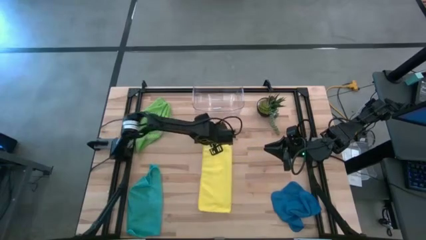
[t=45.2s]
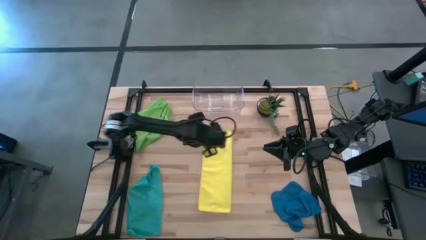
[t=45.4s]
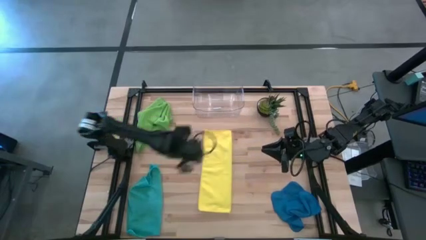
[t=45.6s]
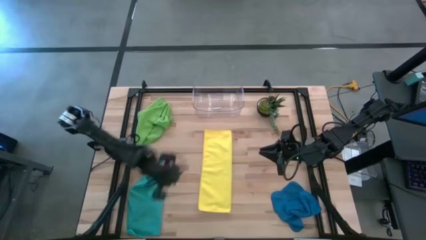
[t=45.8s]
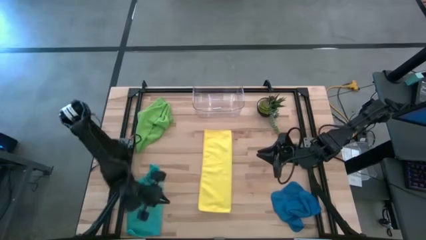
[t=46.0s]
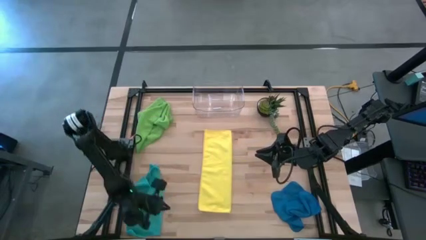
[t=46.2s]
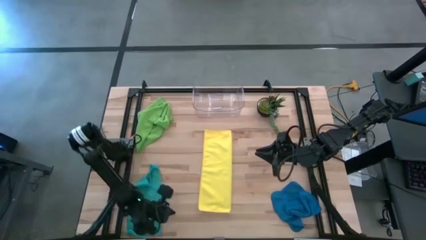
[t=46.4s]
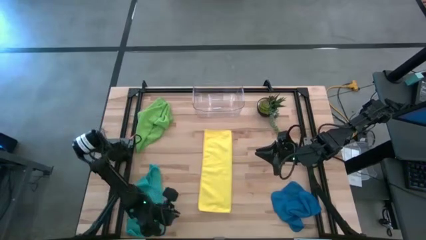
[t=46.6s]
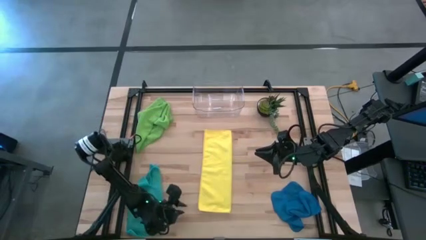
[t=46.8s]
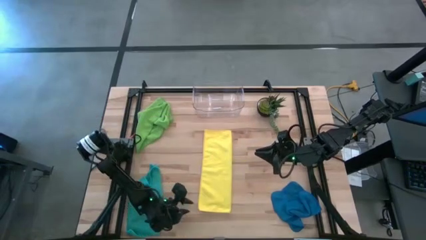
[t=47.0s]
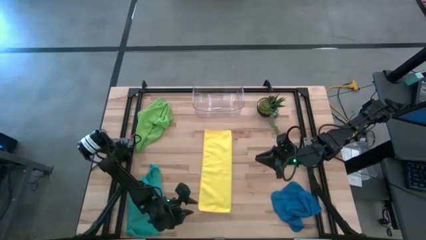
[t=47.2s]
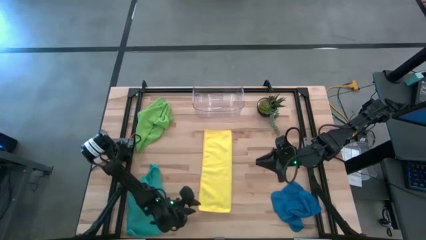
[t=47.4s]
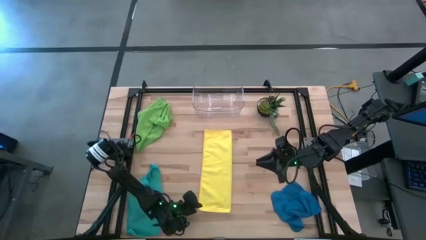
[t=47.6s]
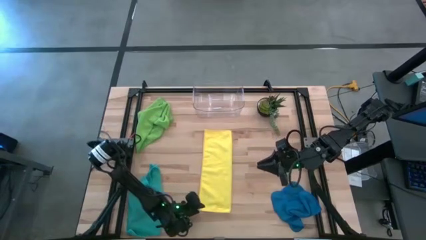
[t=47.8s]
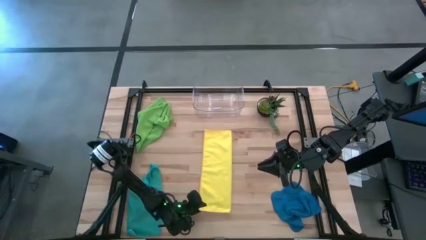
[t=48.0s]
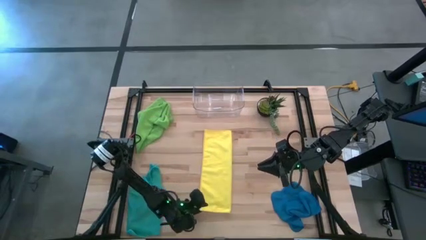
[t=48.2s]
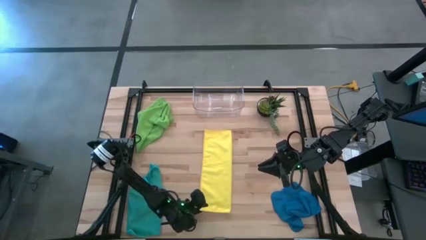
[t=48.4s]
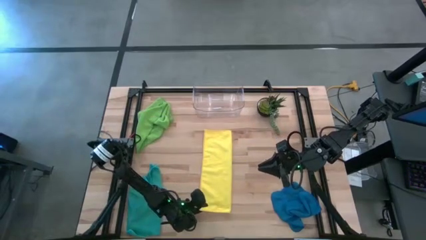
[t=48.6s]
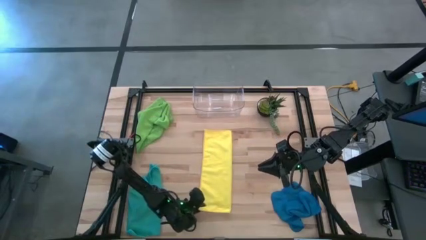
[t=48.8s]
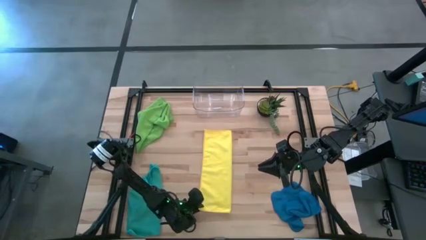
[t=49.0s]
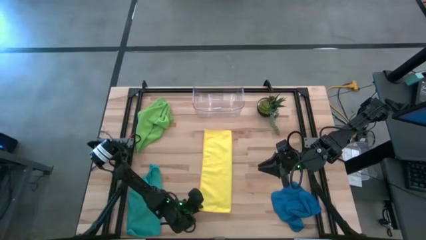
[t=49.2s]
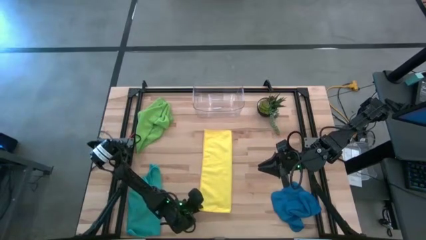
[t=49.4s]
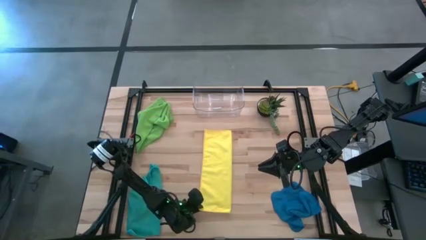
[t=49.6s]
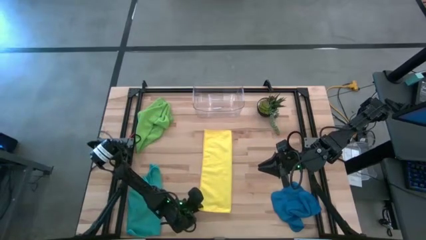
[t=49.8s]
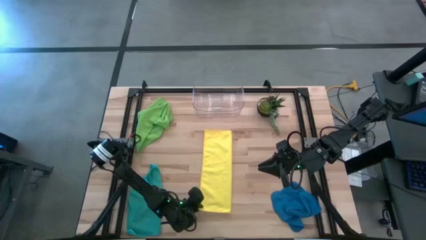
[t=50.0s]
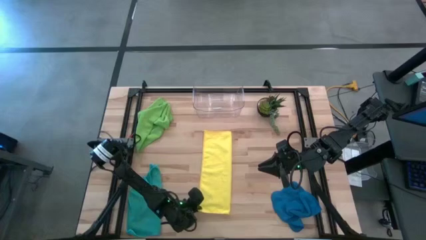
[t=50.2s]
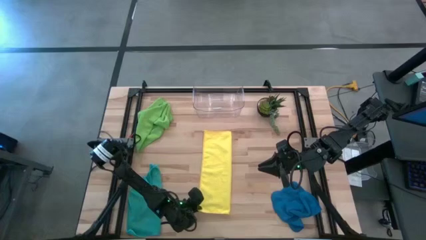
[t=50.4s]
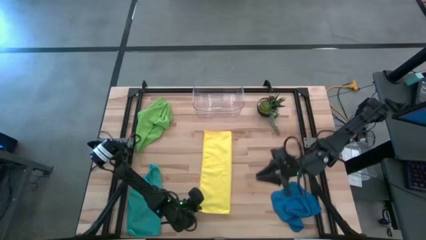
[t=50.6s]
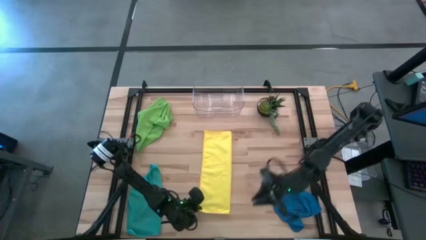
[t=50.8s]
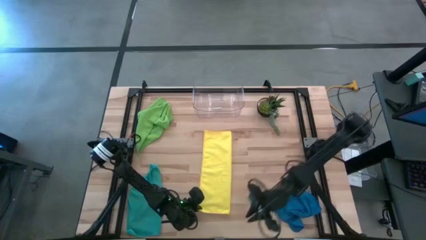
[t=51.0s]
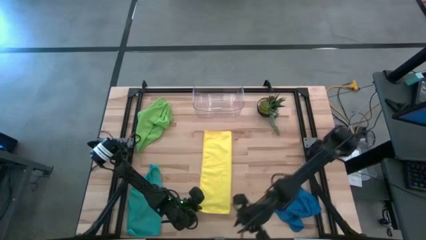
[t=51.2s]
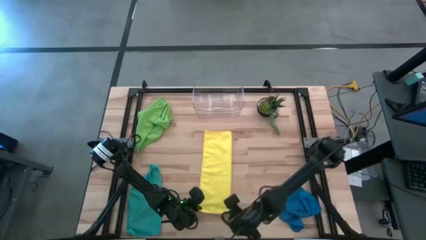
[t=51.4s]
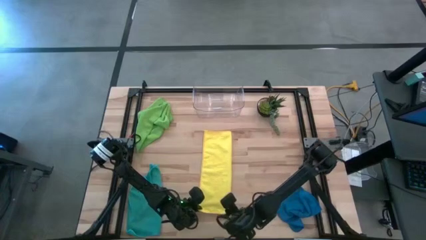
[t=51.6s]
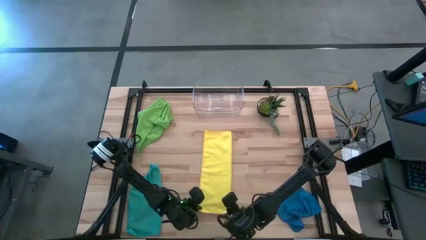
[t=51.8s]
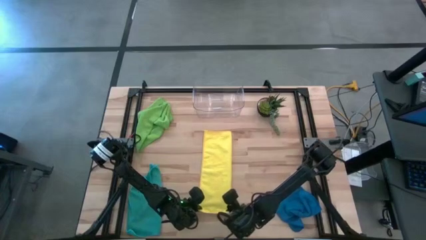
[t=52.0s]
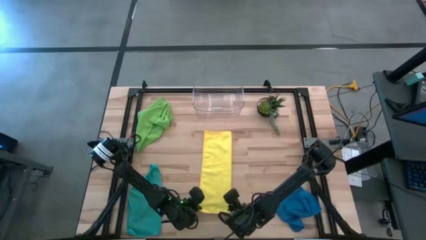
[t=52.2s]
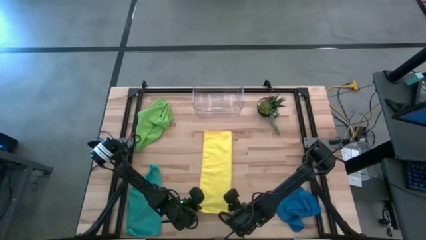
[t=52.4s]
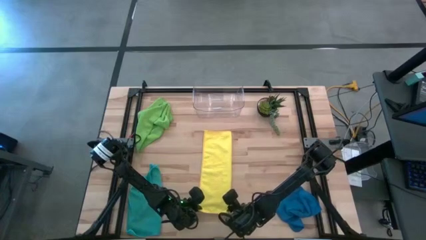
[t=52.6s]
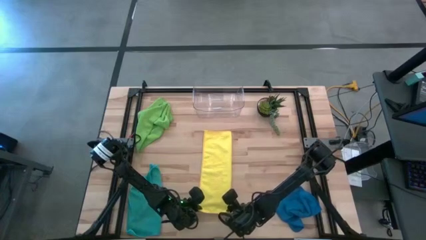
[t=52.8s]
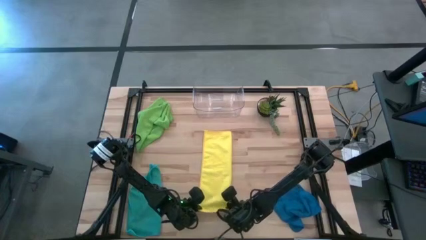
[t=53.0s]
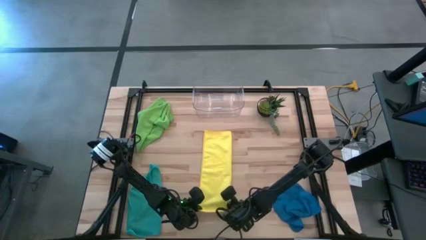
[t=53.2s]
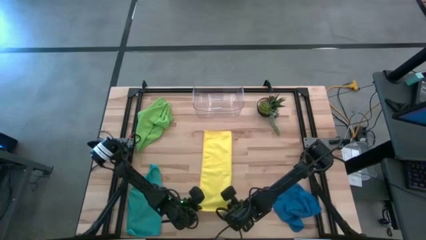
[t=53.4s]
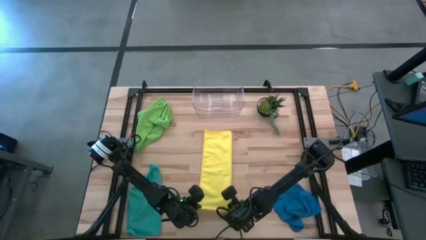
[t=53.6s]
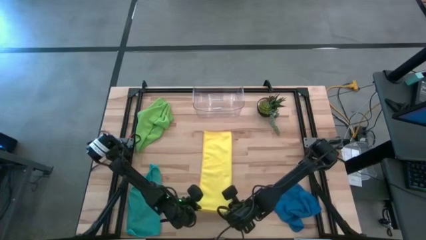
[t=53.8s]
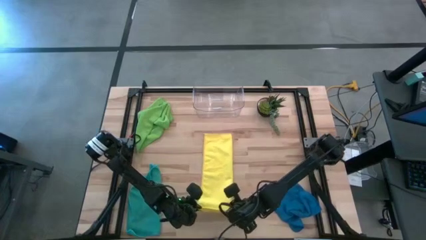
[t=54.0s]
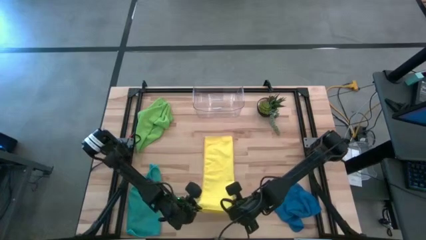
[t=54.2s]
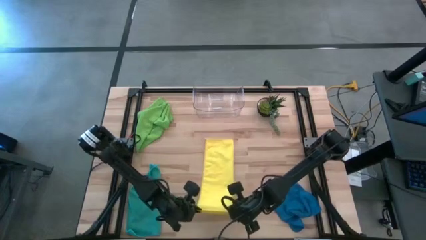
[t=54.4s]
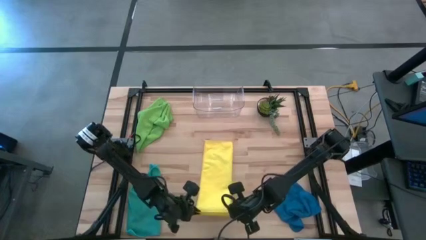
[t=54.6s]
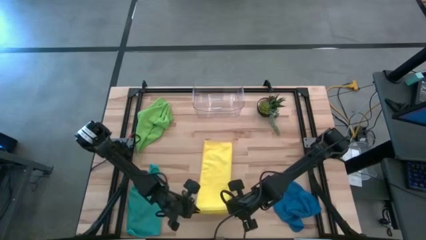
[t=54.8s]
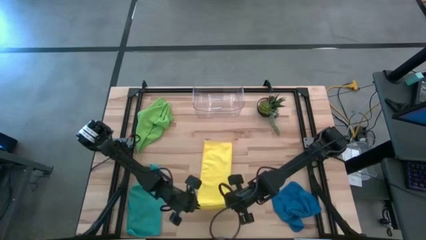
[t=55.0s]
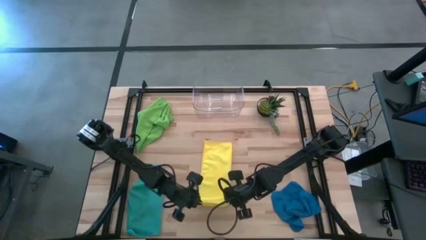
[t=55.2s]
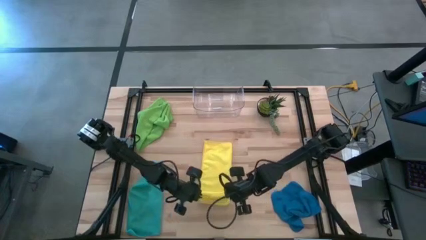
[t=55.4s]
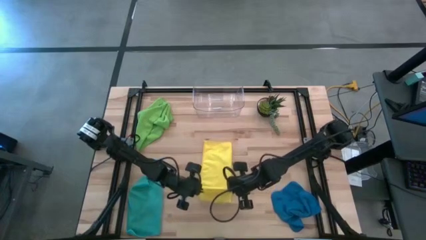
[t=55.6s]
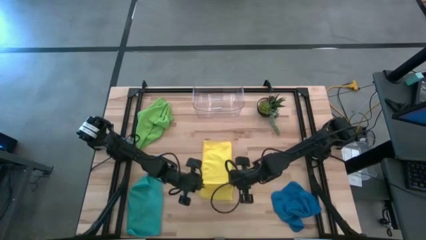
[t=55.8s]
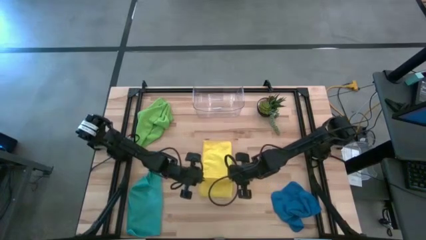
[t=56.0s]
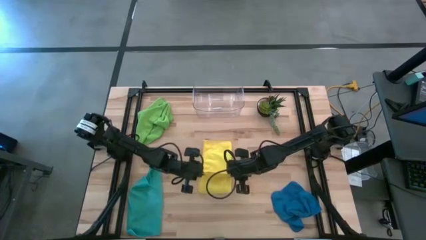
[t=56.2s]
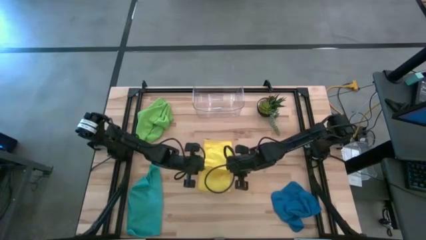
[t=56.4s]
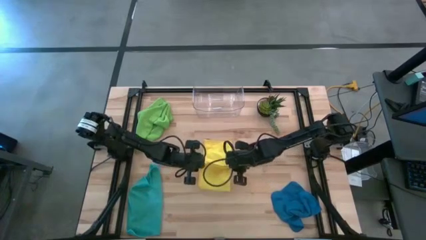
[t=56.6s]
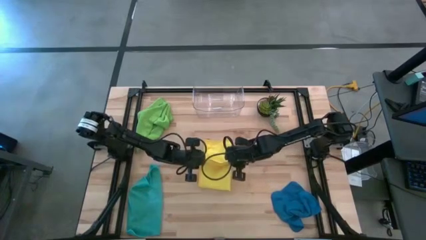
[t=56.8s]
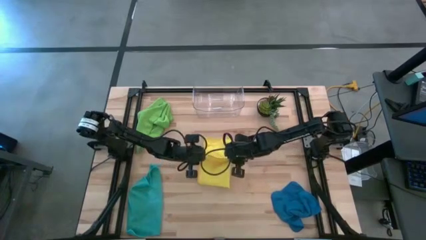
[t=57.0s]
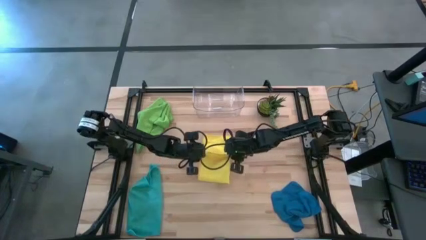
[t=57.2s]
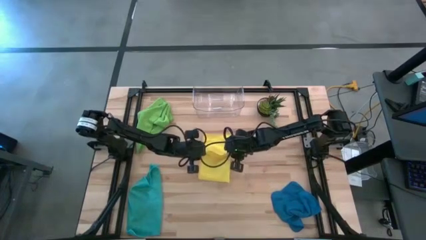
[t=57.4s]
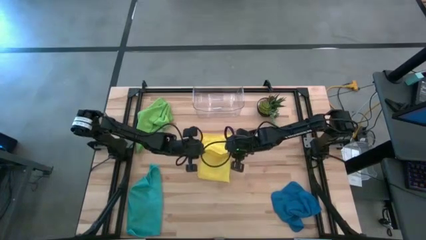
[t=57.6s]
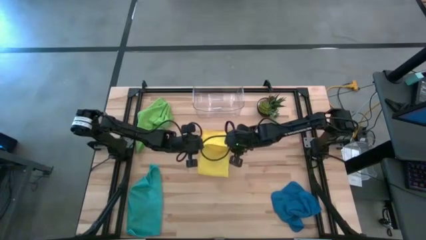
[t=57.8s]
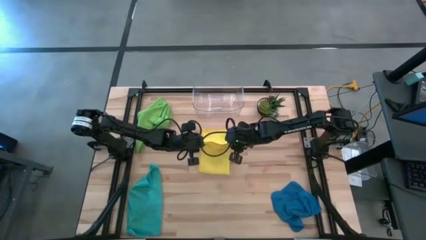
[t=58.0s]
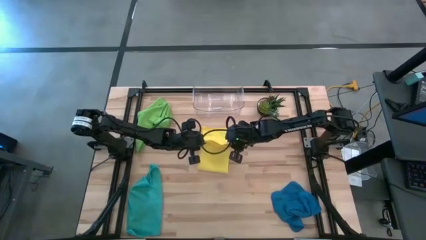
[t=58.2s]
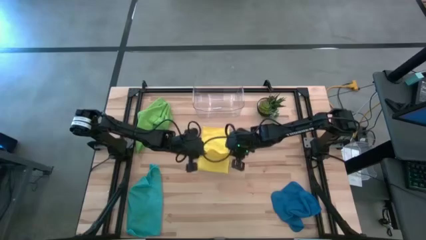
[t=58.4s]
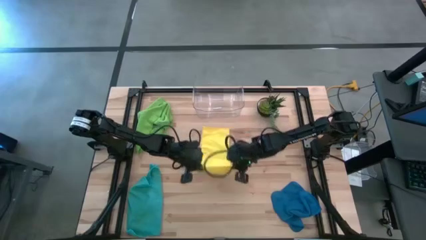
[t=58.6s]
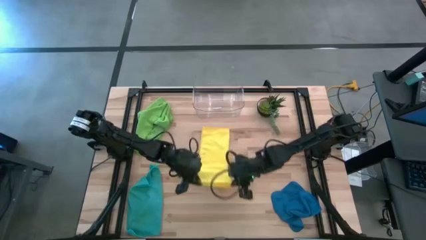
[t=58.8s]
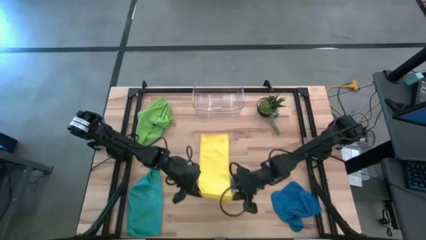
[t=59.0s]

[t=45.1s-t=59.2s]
Task: Fold microfiber towels
Fold the yellow microfiber towel
